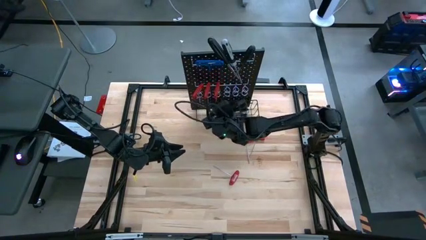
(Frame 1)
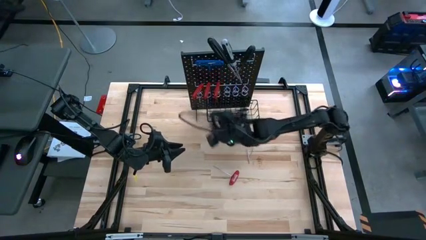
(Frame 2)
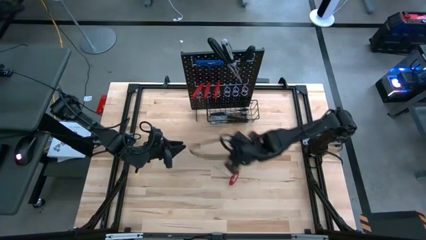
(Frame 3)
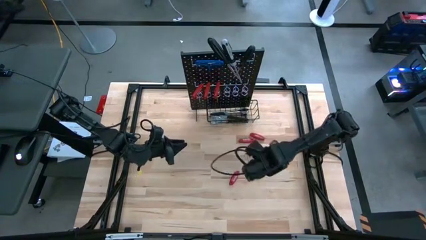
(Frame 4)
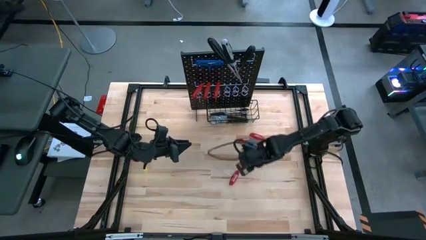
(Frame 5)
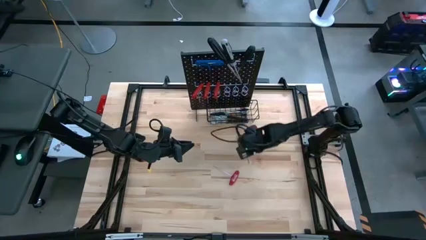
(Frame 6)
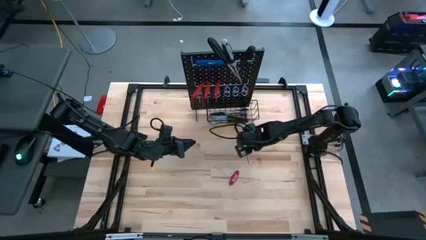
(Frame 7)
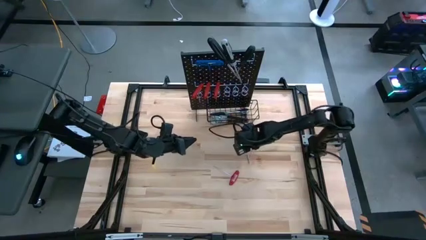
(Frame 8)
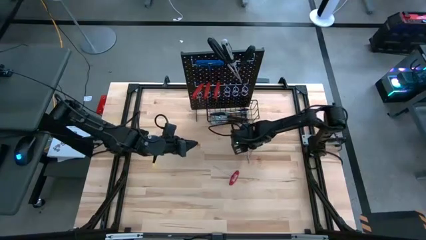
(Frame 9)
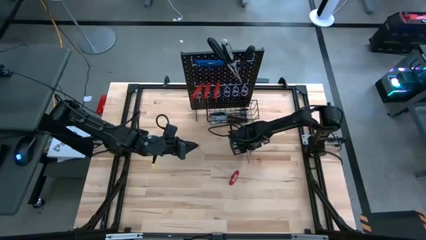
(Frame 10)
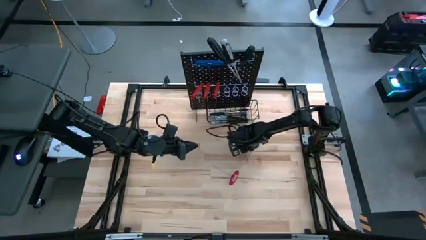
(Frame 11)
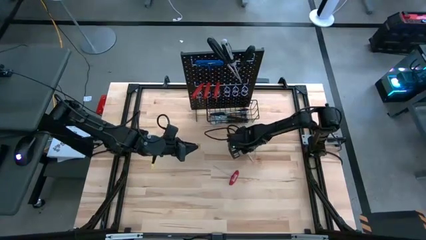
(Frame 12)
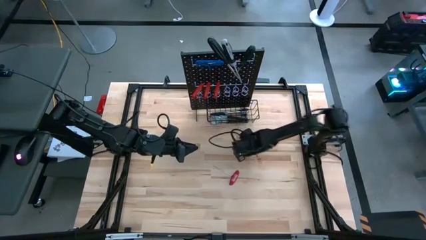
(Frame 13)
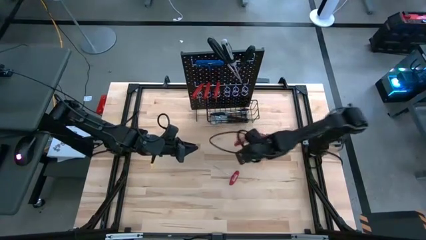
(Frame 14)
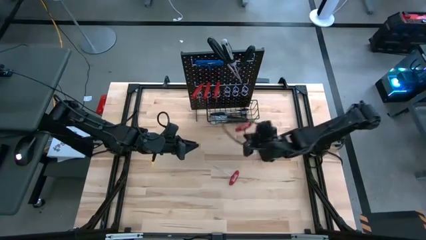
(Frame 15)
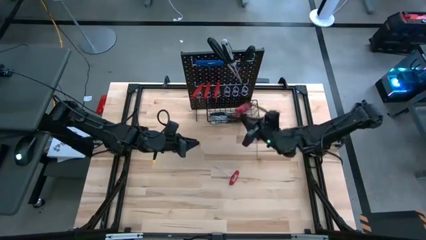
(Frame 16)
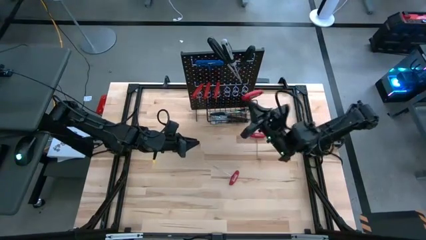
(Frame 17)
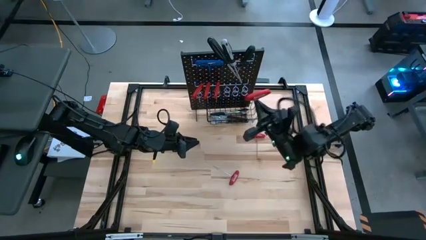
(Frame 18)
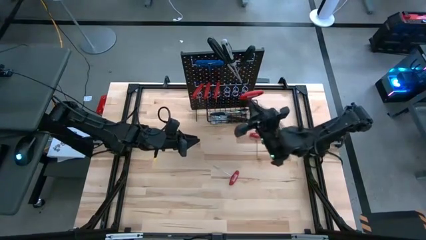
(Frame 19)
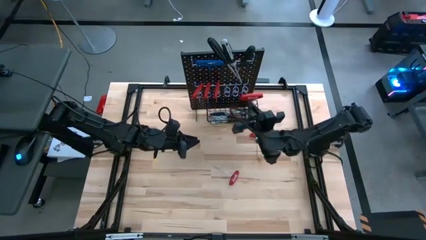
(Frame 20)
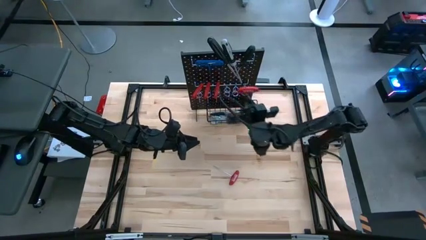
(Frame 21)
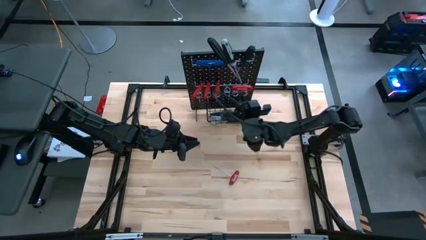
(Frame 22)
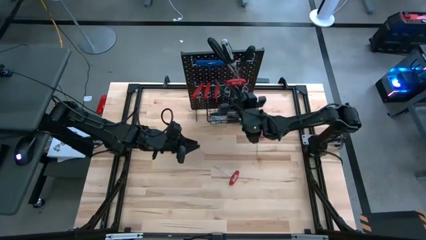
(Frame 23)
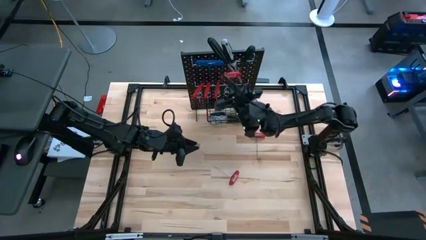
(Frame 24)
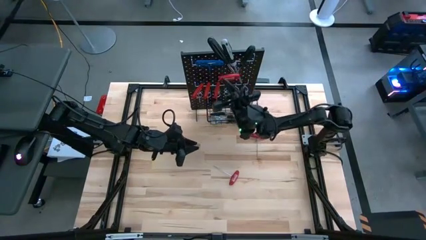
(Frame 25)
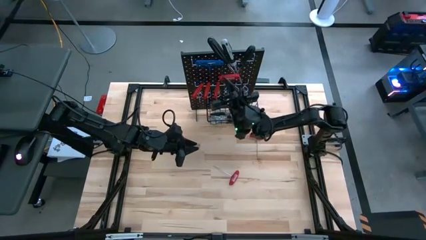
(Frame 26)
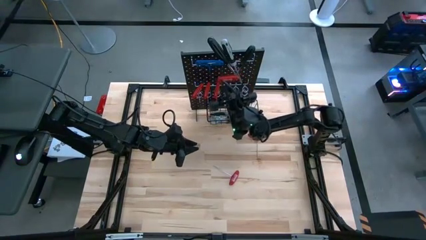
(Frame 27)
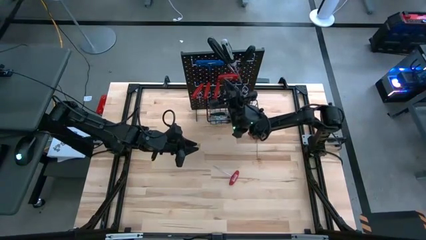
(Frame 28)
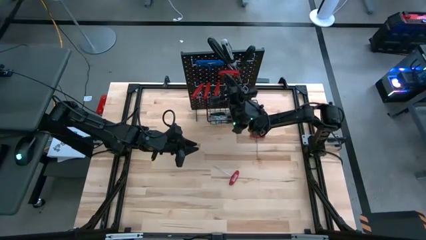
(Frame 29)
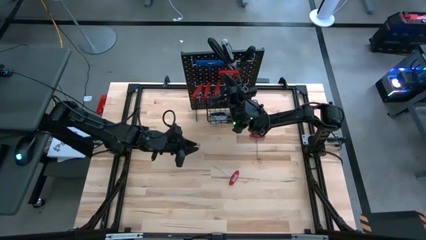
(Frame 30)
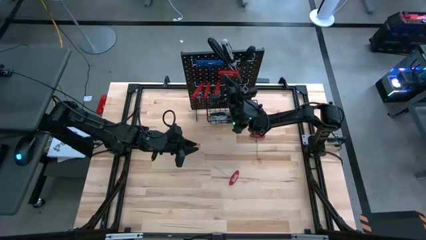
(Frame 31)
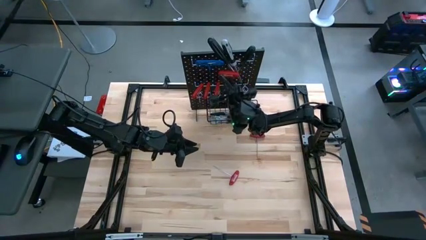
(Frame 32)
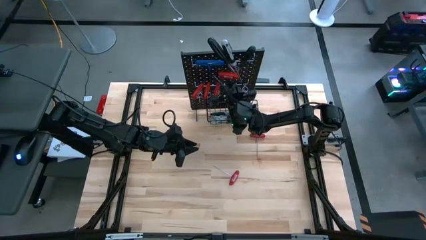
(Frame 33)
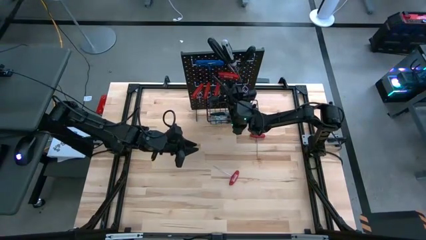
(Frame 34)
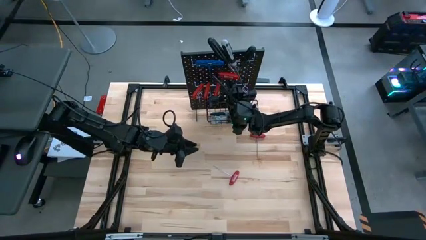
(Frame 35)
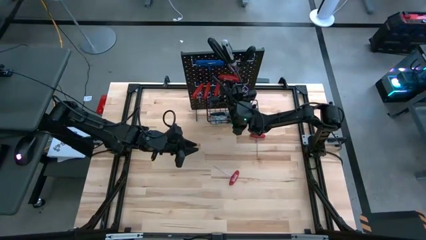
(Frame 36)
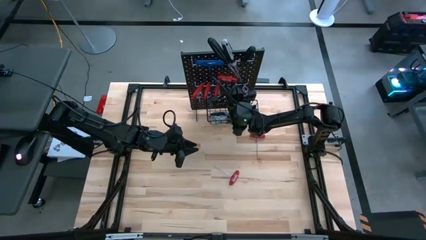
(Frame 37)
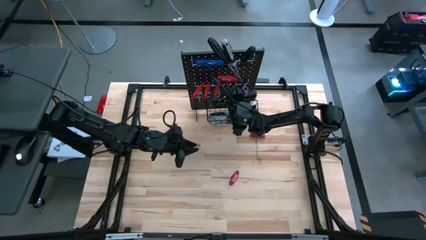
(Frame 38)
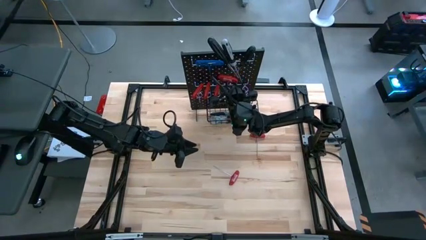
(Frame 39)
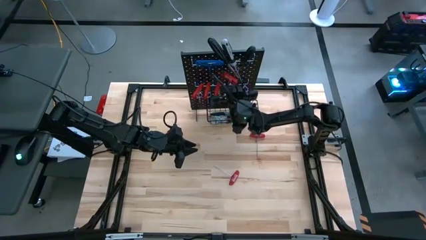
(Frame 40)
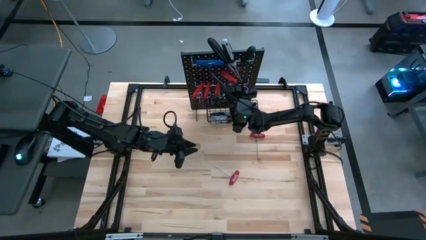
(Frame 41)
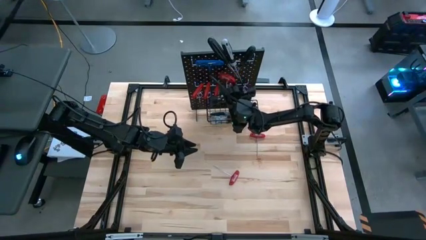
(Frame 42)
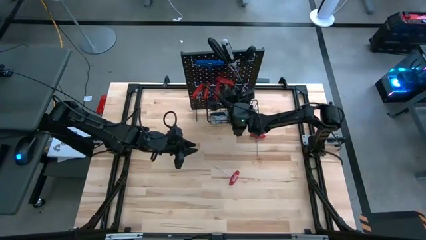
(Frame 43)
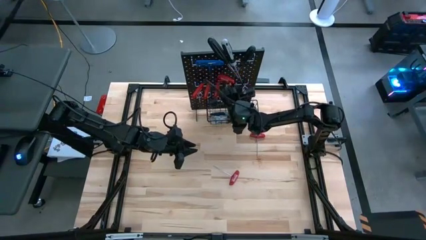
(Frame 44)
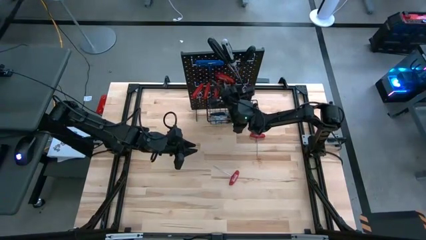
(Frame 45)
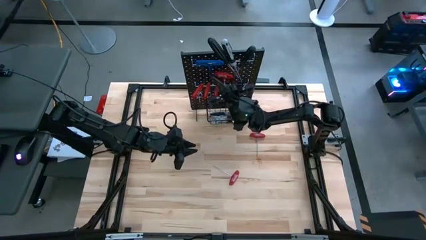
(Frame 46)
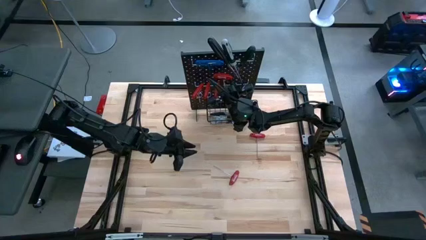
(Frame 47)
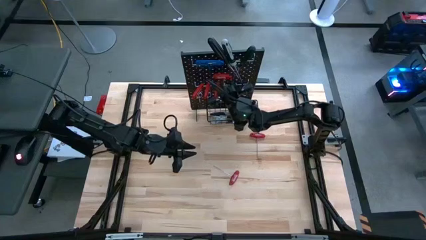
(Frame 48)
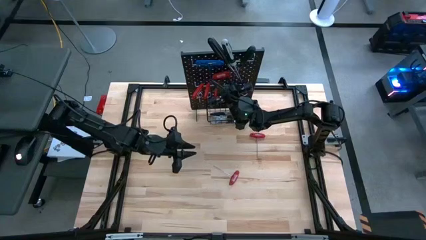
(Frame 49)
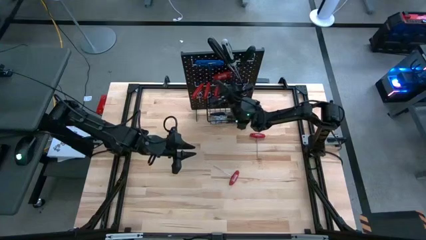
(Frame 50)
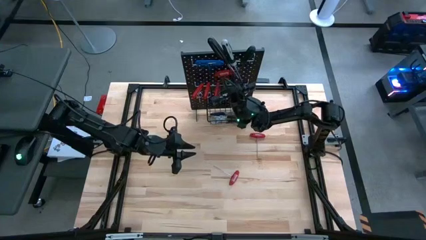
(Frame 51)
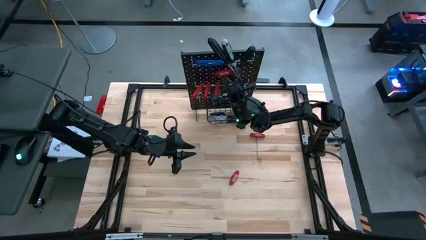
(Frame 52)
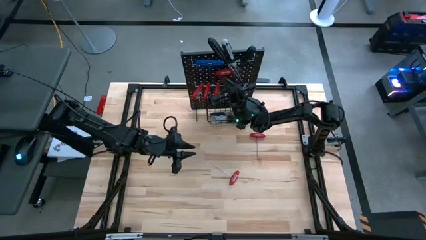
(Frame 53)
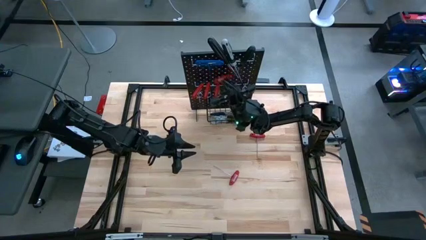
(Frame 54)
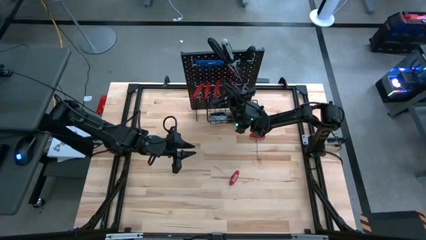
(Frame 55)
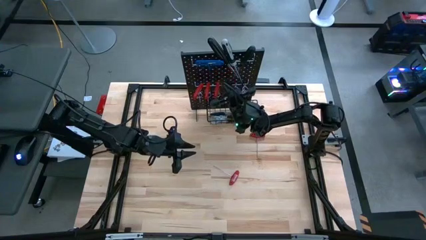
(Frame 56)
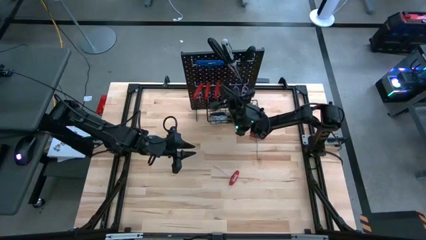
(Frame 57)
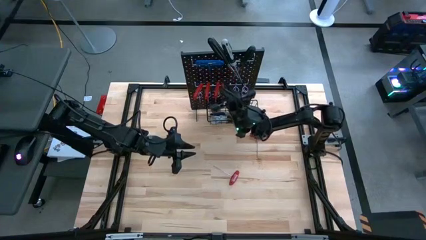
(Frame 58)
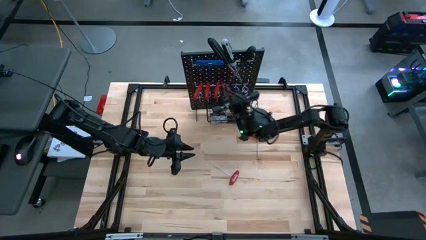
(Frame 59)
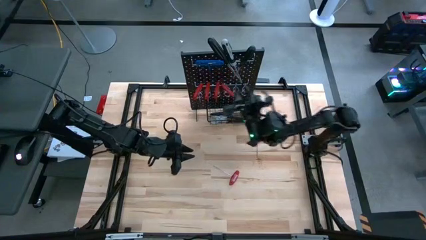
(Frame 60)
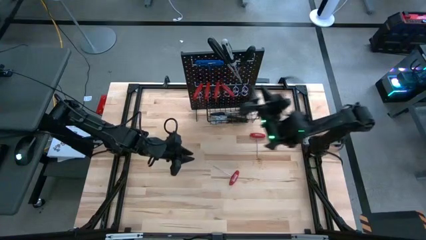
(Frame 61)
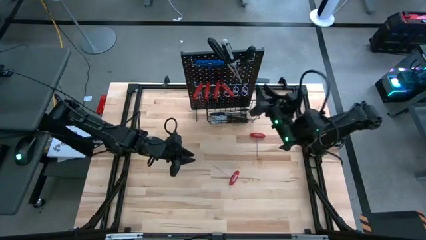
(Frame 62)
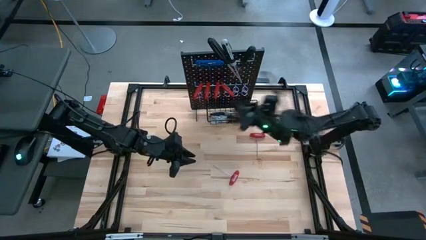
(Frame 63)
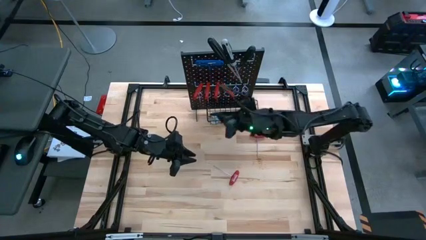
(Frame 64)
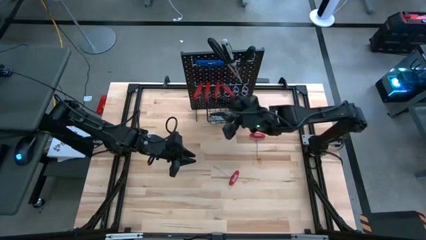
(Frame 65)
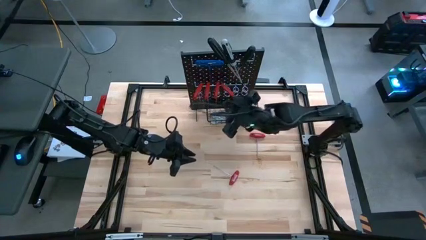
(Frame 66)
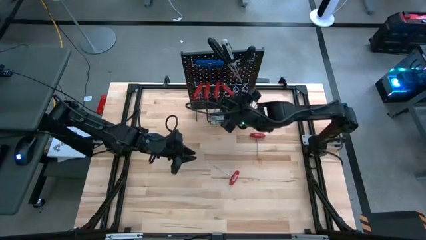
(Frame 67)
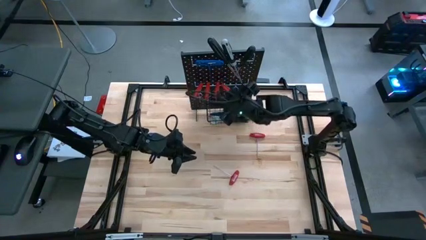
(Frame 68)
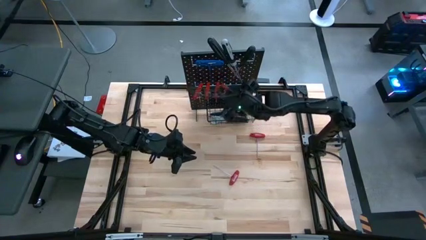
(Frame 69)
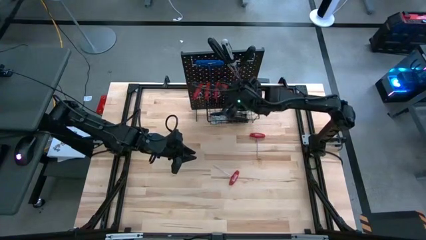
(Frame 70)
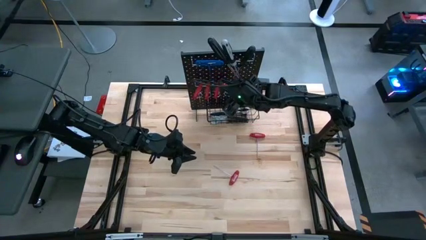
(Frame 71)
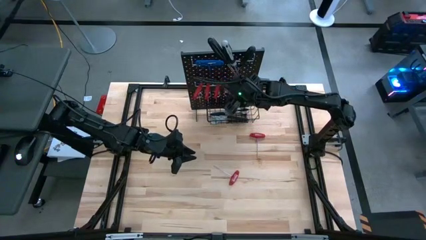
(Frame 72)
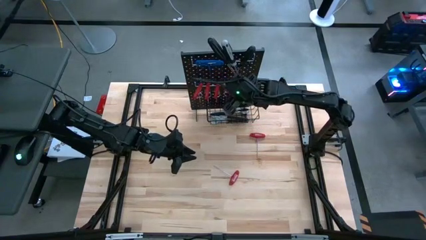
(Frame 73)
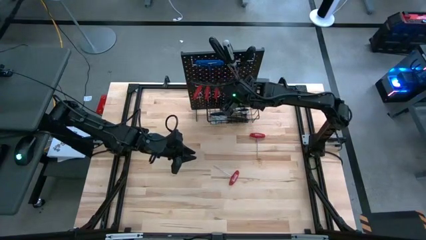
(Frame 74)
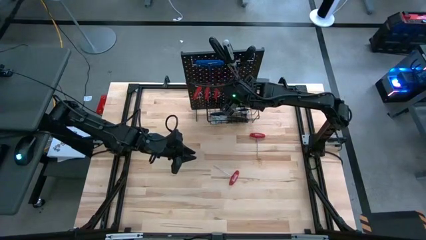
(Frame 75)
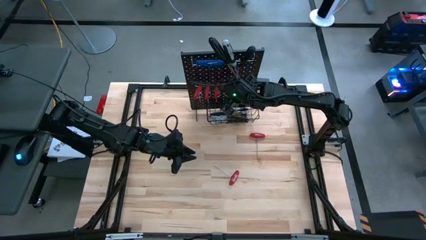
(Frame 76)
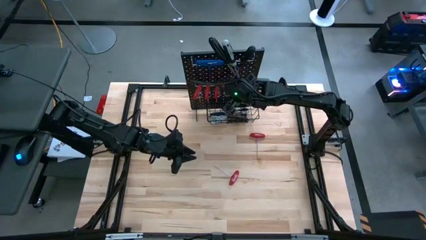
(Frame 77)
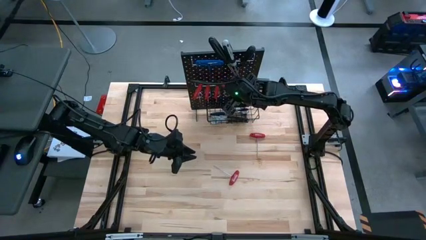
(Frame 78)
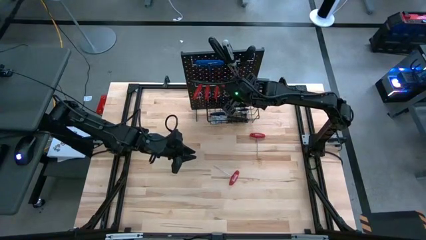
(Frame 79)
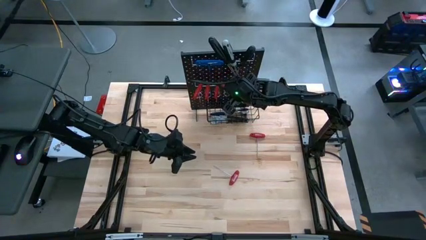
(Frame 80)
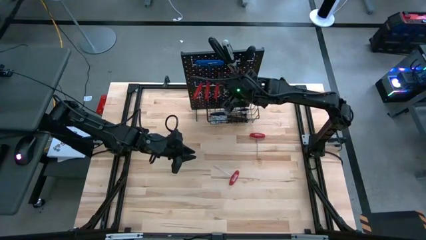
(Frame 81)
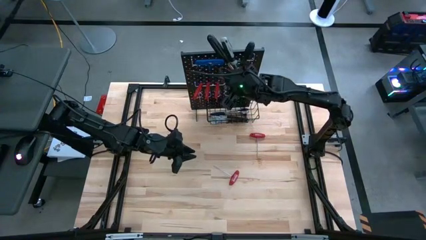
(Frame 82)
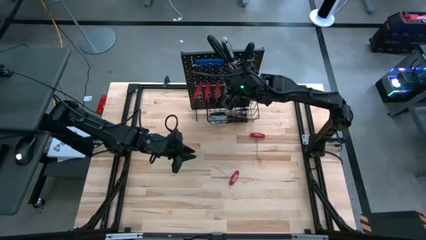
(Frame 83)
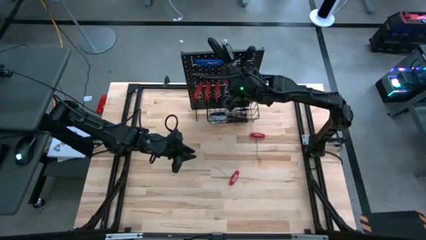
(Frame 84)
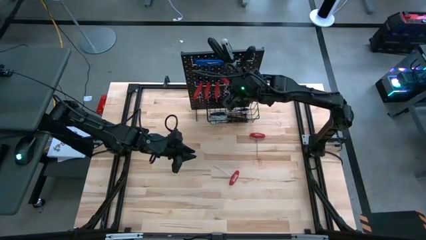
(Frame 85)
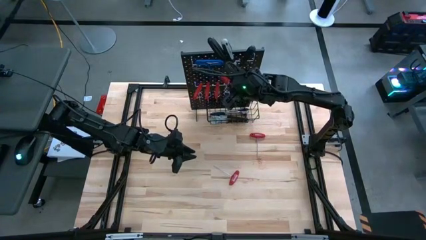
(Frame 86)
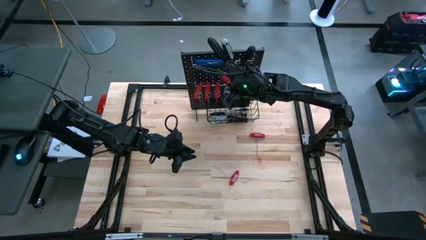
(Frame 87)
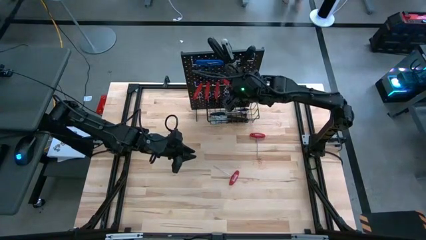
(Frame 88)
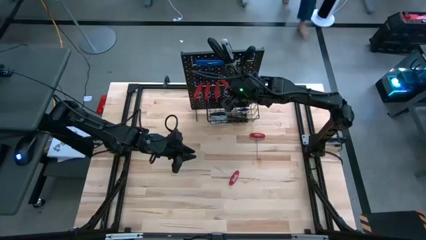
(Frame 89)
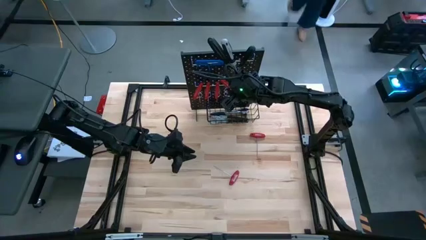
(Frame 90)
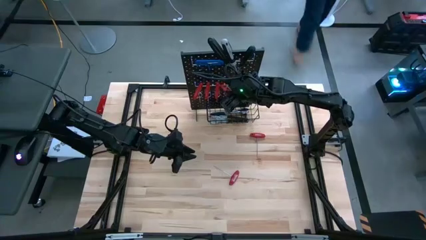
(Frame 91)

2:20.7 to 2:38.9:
Task: Hang tools onto peg board
Hang the red allen wrench on the pegboard
